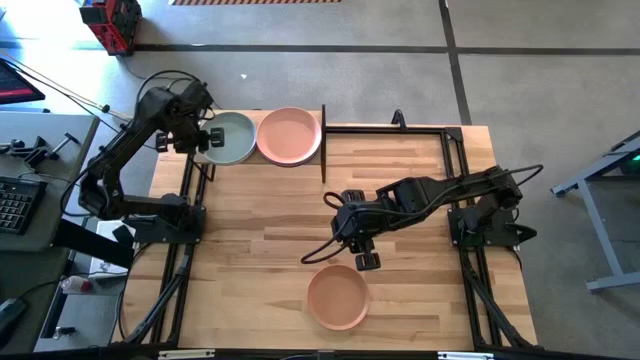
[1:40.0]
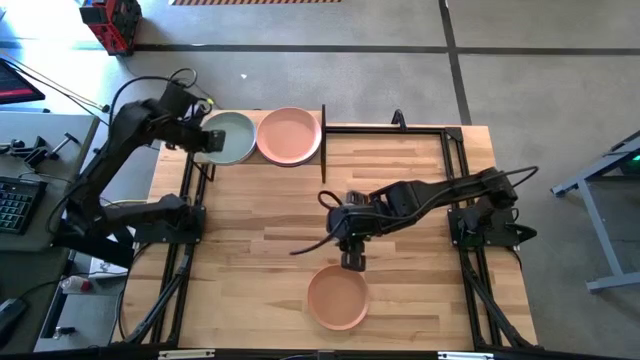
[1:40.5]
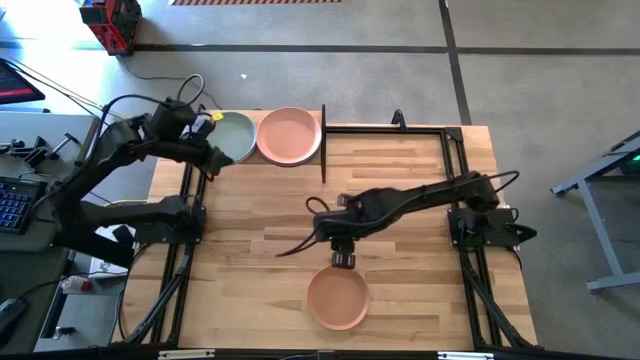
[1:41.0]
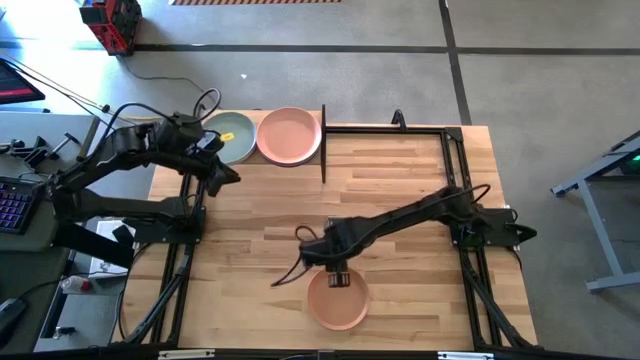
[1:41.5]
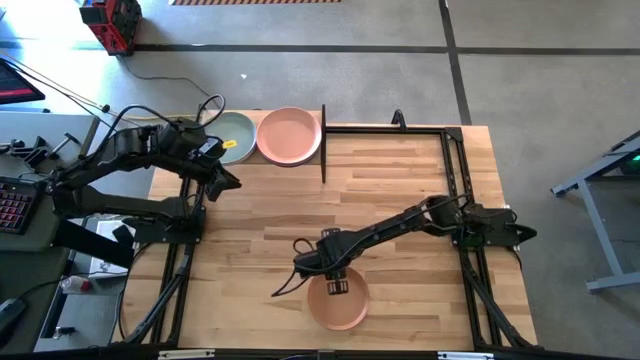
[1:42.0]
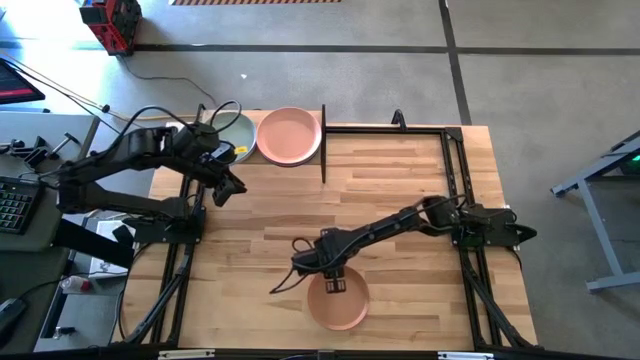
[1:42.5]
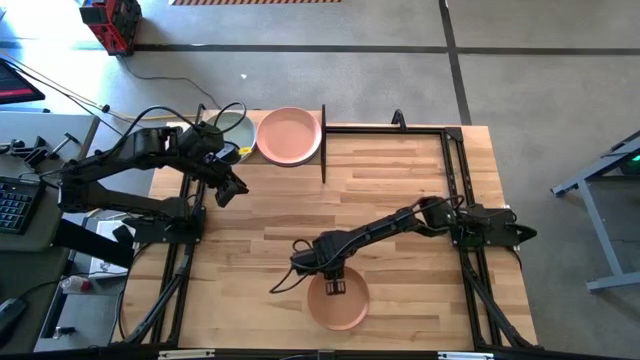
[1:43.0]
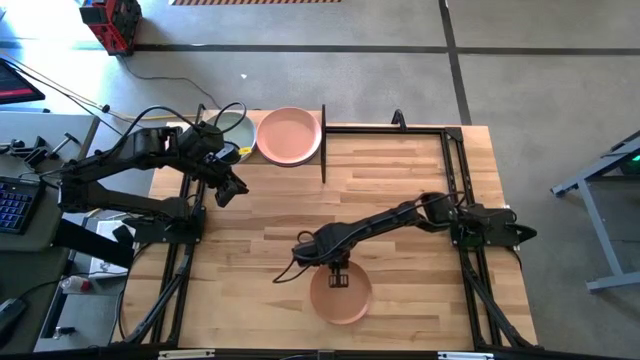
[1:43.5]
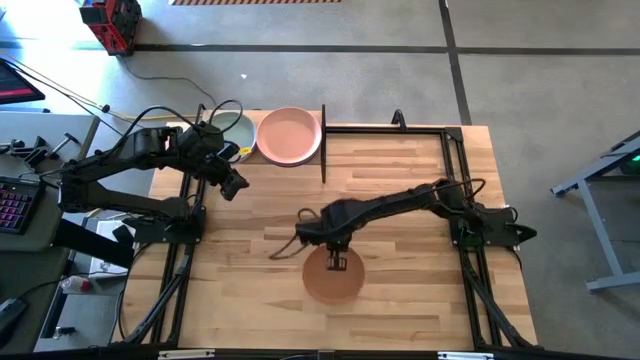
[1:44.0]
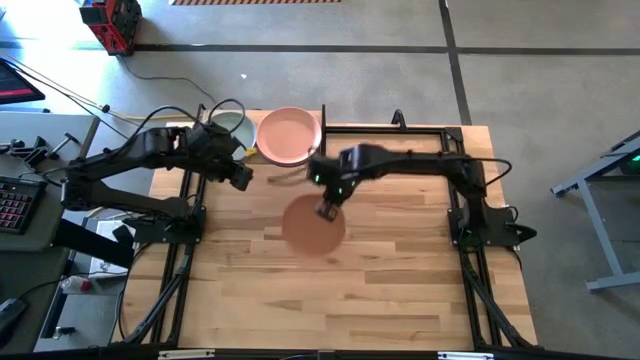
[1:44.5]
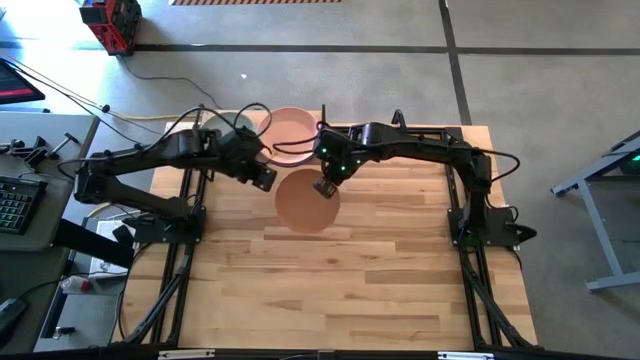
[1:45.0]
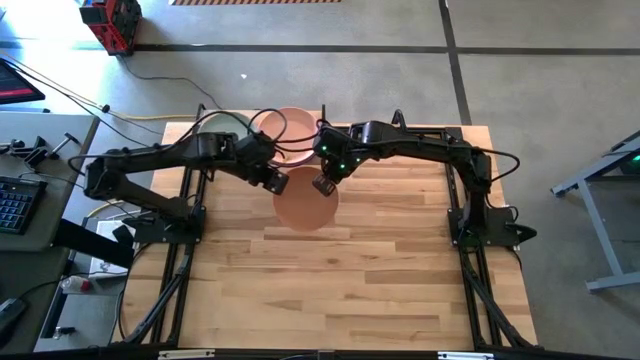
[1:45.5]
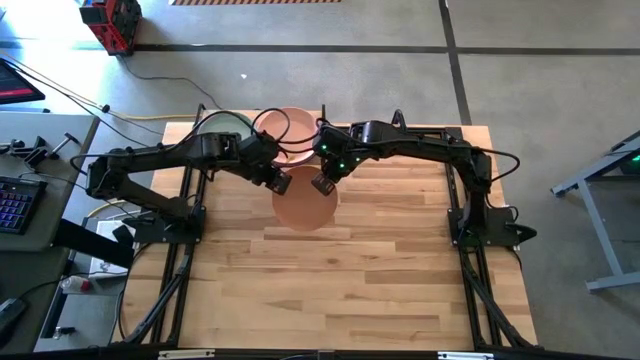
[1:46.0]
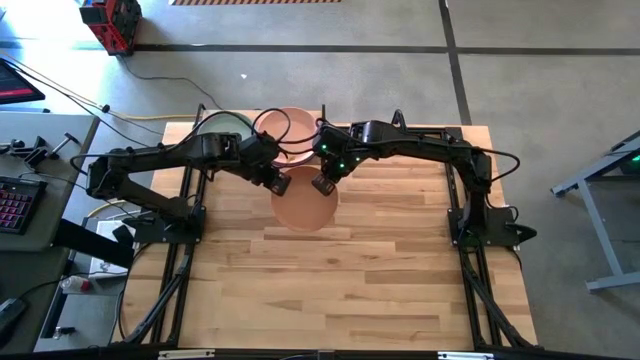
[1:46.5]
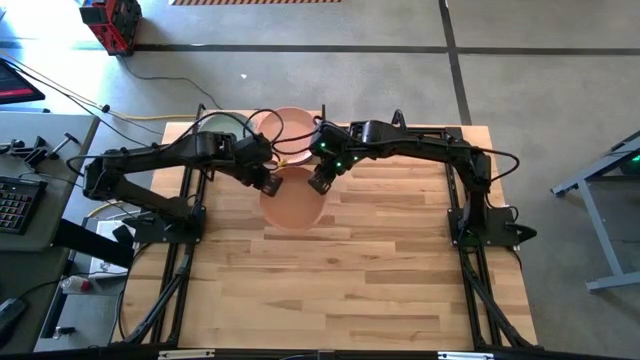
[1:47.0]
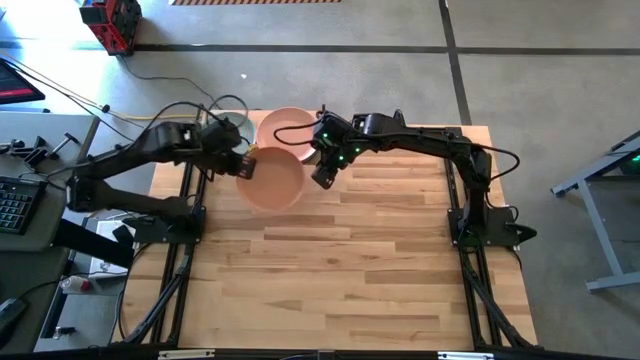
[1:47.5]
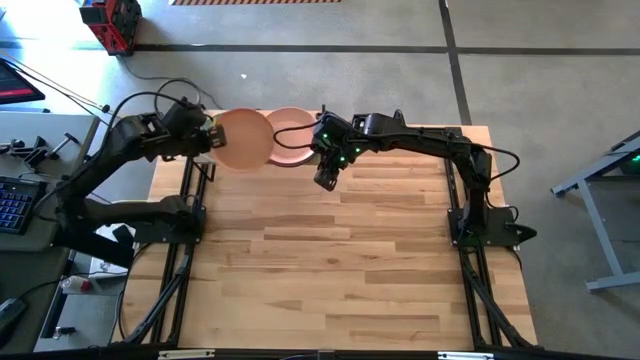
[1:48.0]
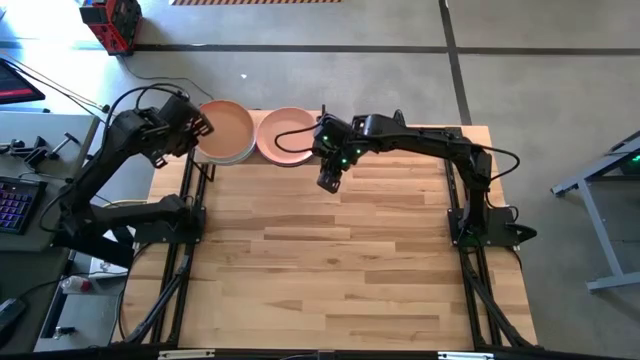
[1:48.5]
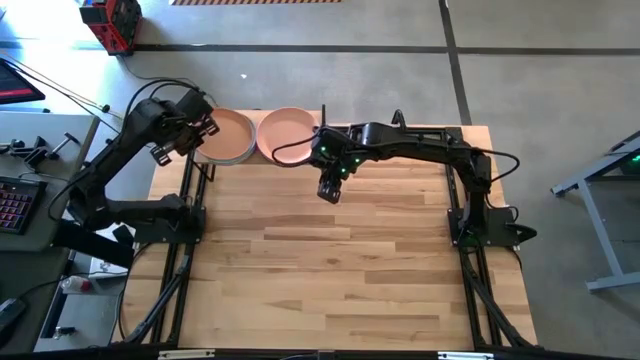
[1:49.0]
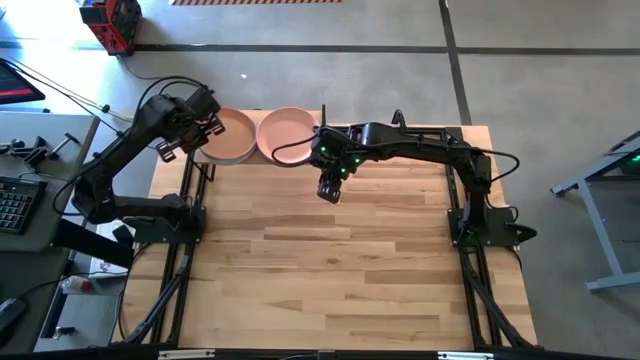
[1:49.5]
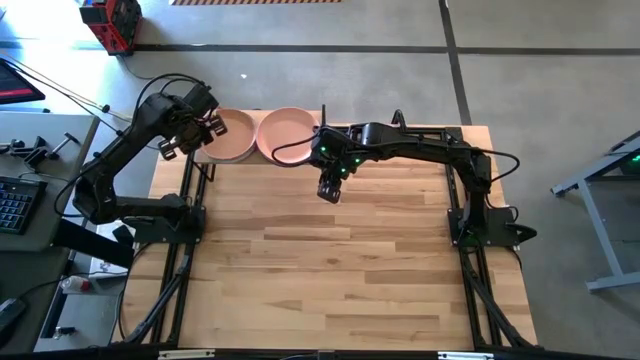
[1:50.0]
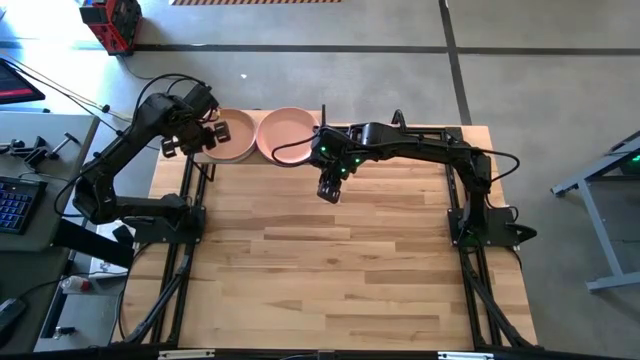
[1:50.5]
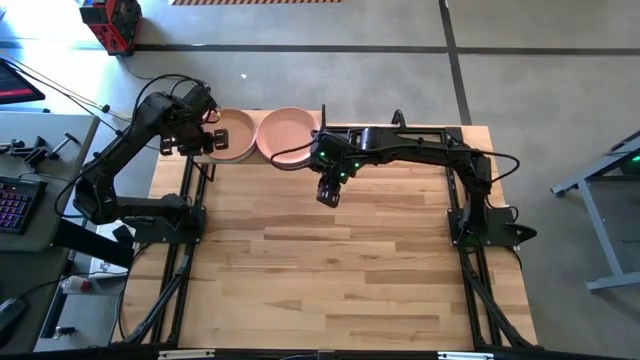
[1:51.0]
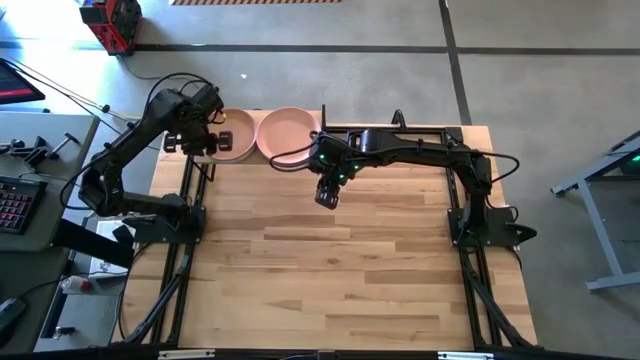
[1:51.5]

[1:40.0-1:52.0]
Task: Place and stack plates onto a shelf
Stack the light orange plate on top of the light blue plate on the shelf

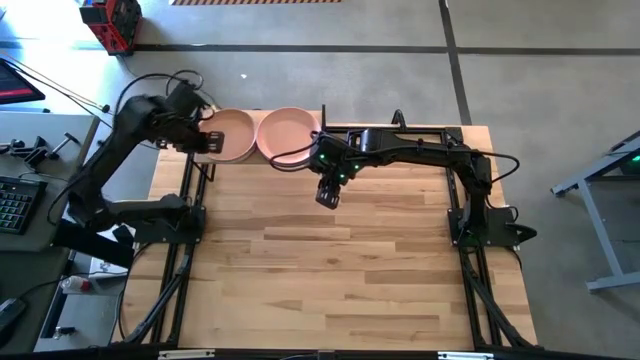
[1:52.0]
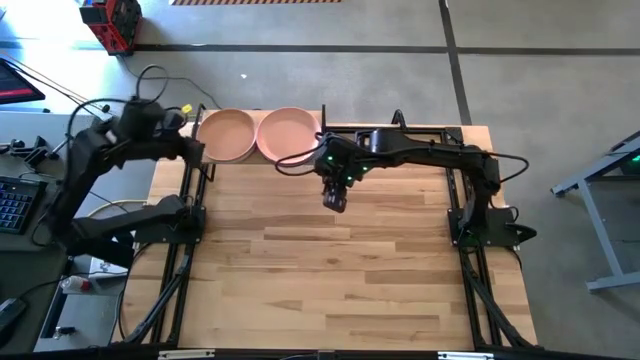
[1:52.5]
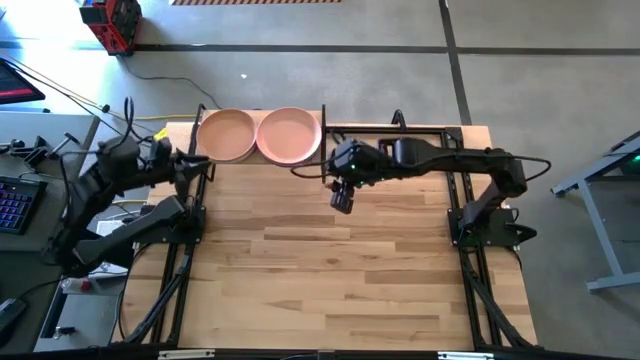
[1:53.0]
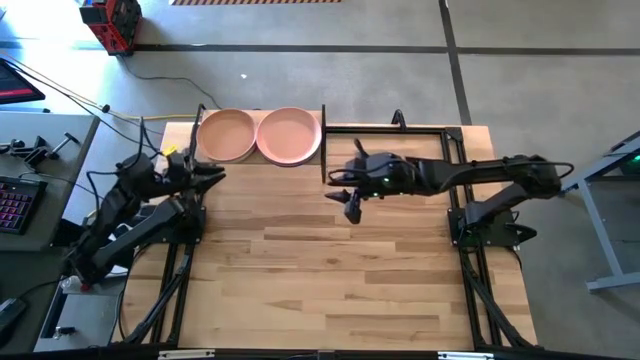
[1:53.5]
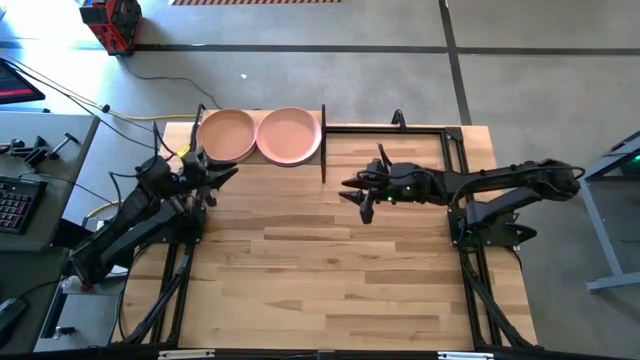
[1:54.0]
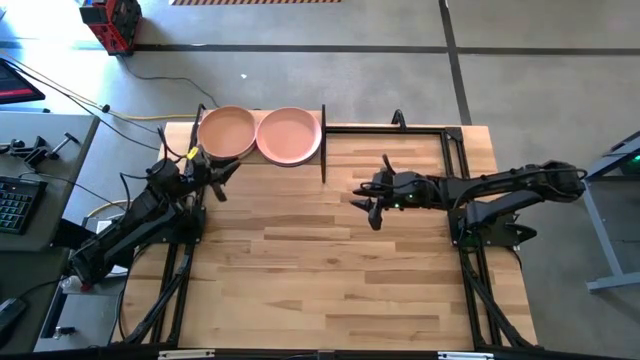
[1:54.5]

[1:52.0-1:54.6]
Adjust the plates on the shelf

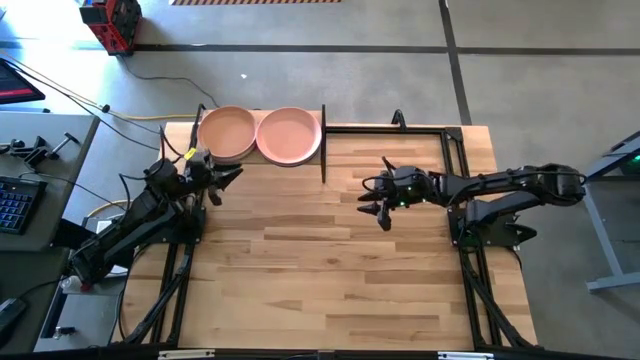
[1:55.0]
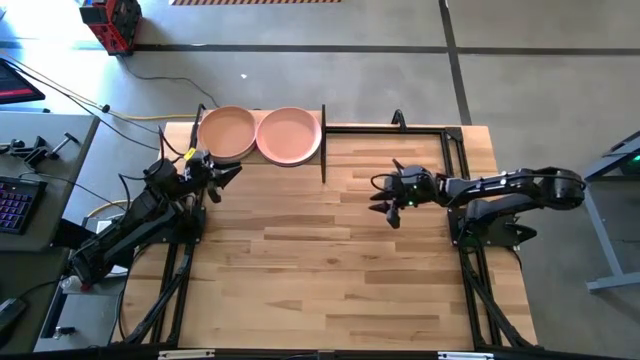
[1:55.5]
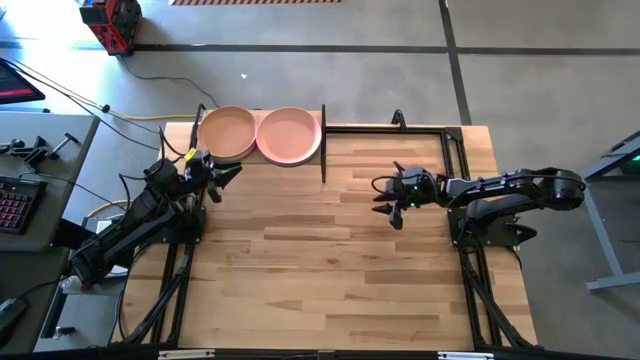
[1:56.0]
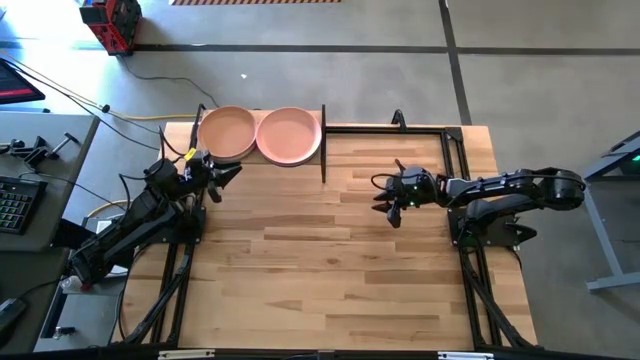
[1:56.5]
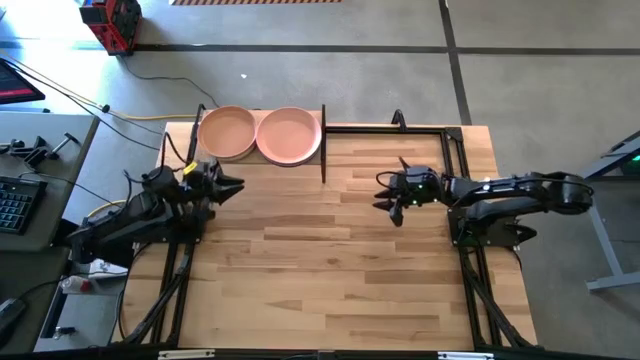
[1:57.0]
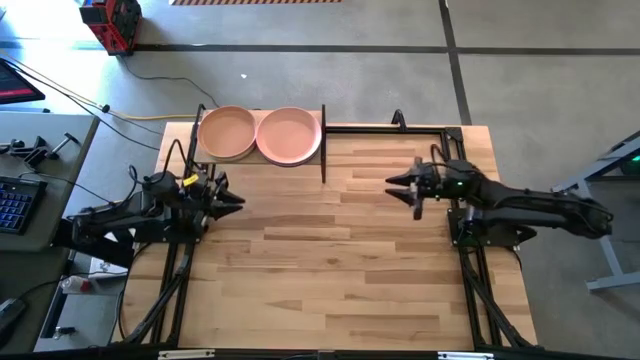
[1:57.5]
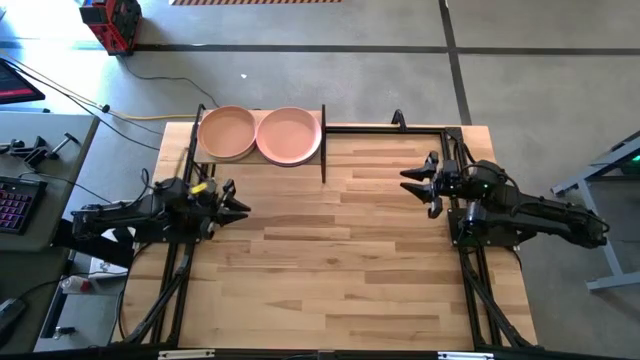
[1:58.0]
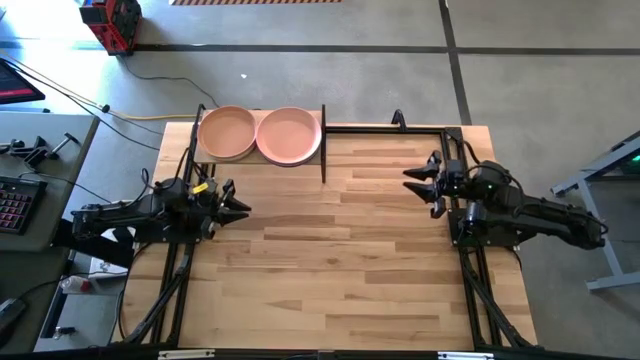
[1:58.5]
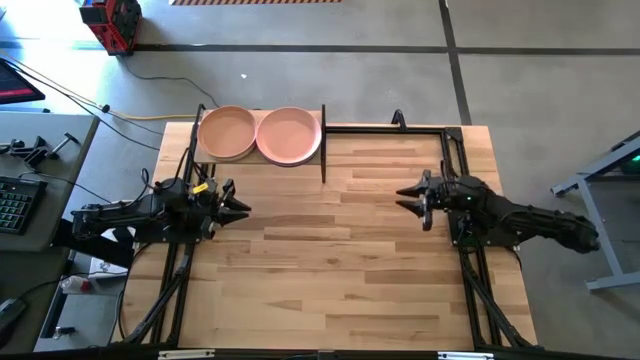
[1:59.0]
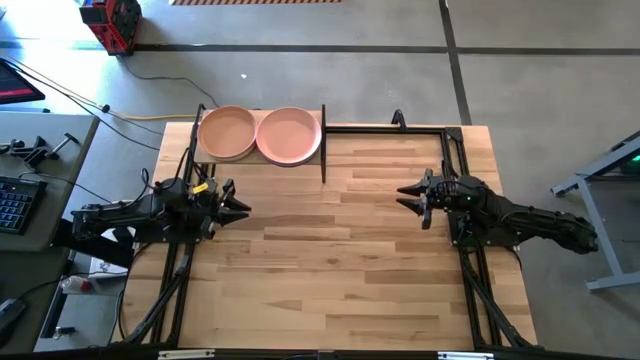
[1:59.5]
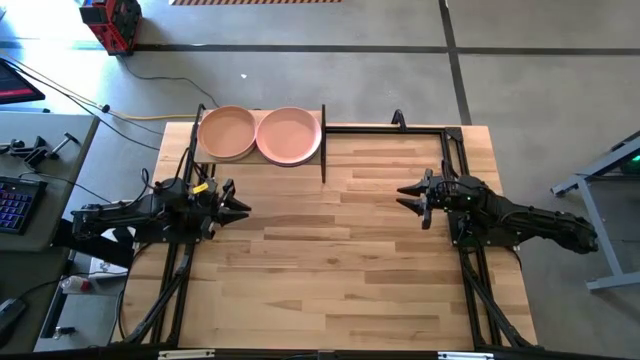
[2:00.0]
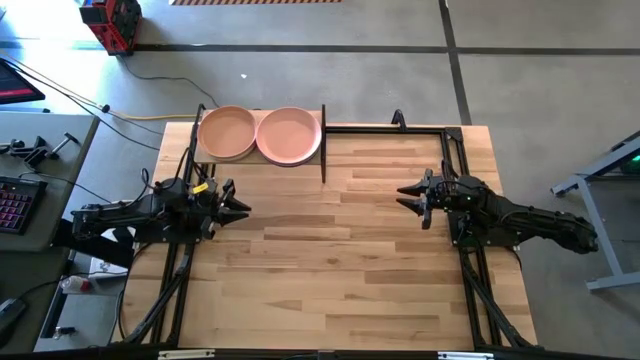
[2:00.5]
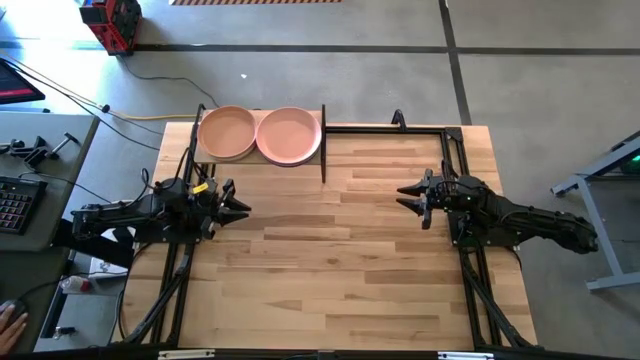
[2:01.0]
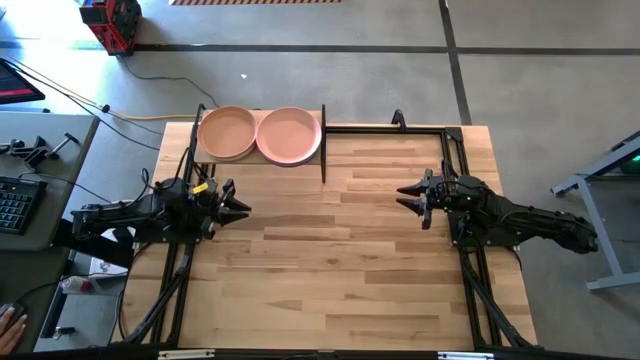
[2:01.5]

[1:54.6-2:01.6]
Return to Home Position
